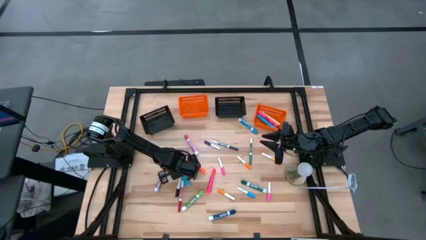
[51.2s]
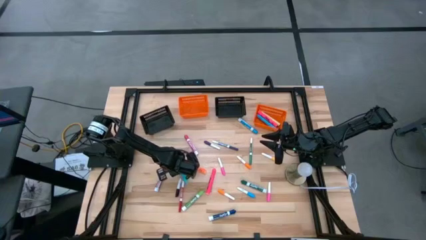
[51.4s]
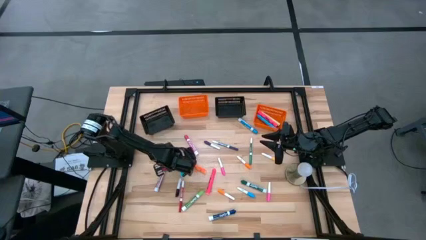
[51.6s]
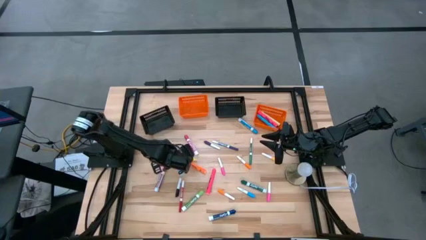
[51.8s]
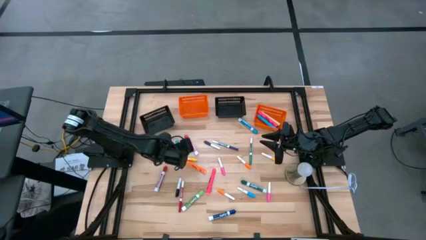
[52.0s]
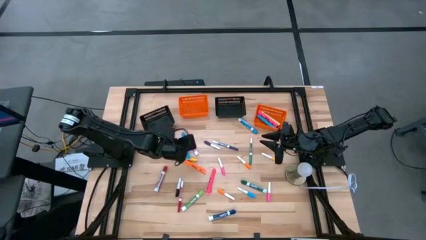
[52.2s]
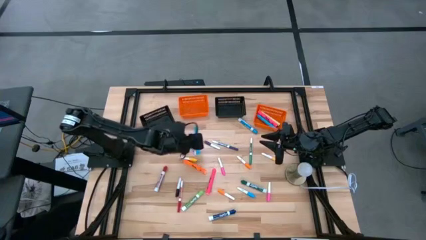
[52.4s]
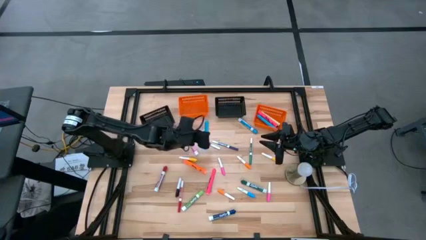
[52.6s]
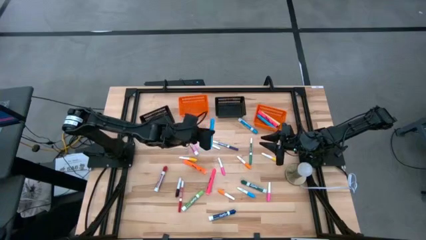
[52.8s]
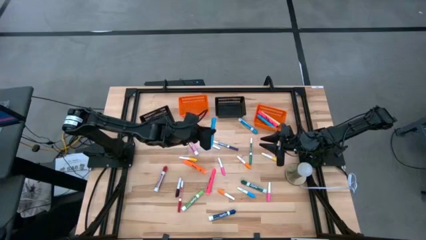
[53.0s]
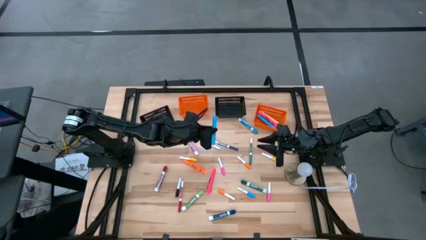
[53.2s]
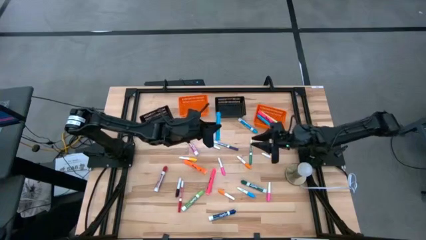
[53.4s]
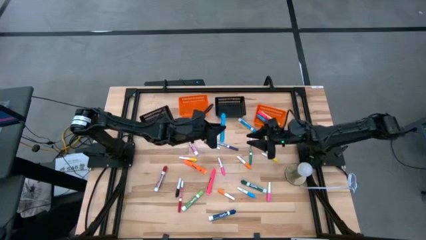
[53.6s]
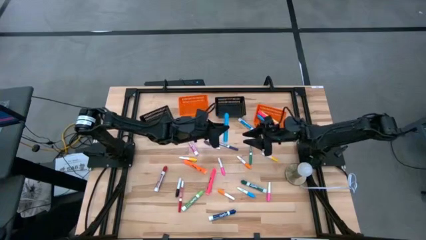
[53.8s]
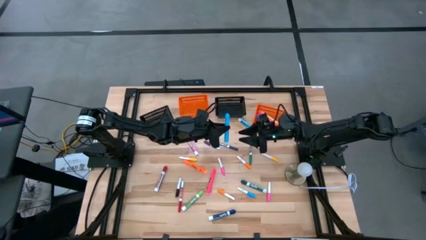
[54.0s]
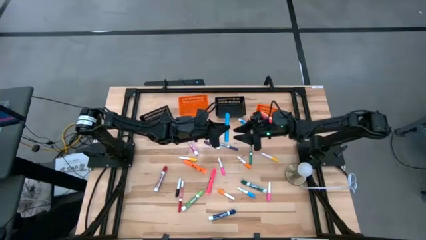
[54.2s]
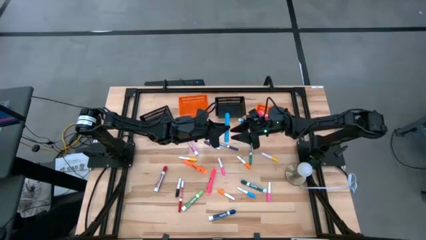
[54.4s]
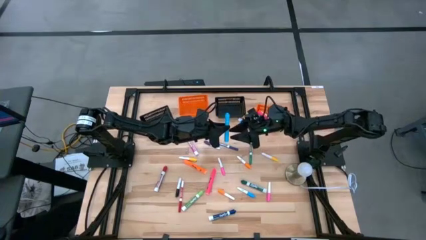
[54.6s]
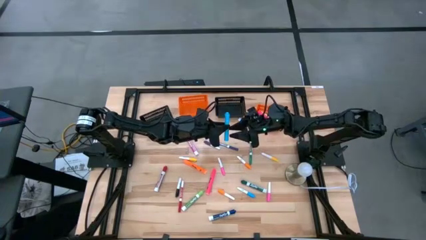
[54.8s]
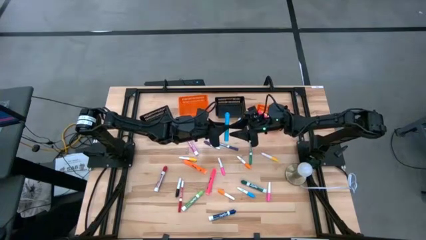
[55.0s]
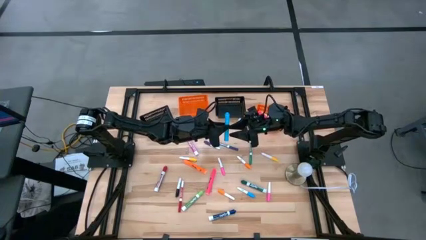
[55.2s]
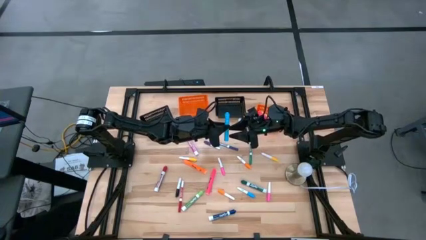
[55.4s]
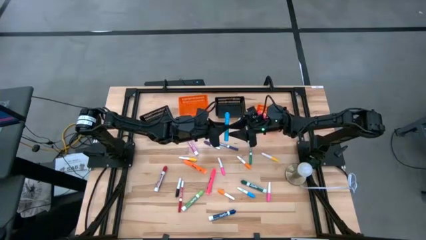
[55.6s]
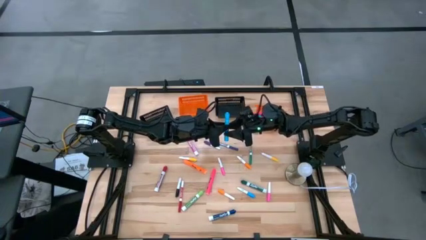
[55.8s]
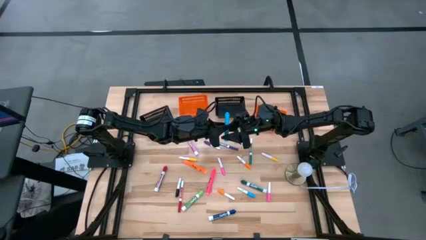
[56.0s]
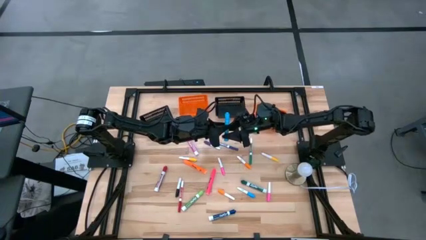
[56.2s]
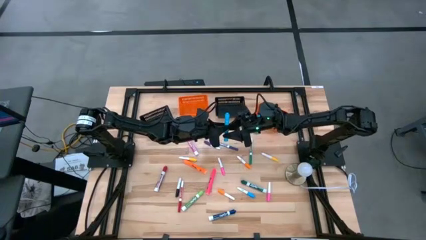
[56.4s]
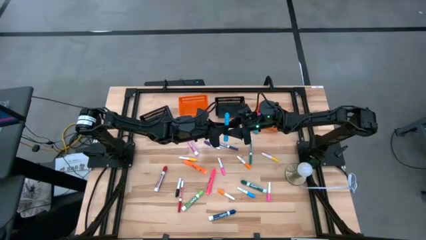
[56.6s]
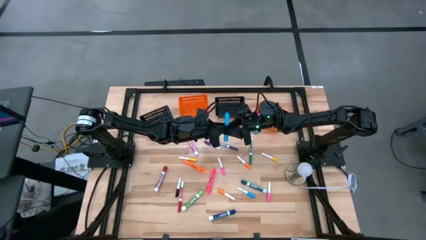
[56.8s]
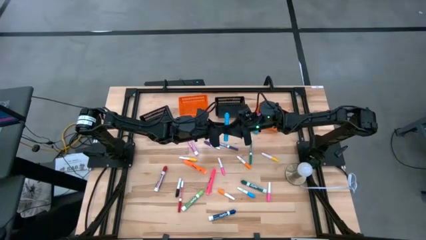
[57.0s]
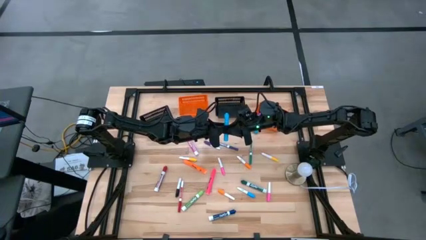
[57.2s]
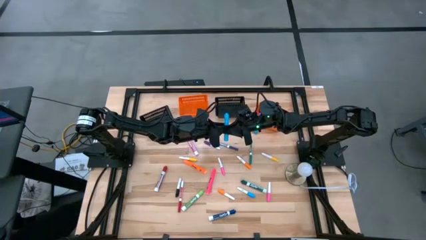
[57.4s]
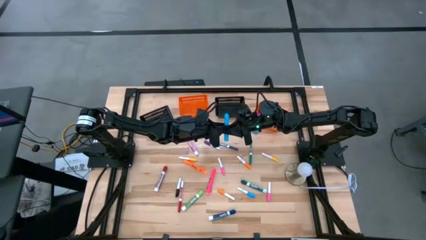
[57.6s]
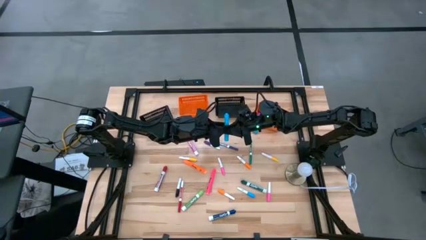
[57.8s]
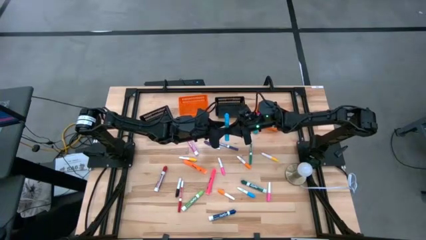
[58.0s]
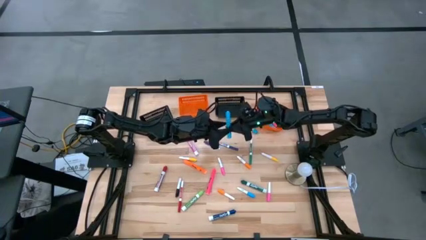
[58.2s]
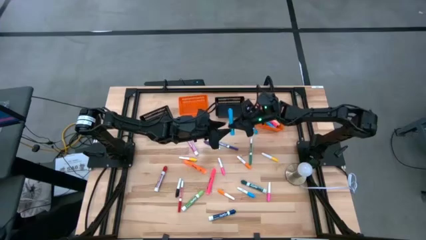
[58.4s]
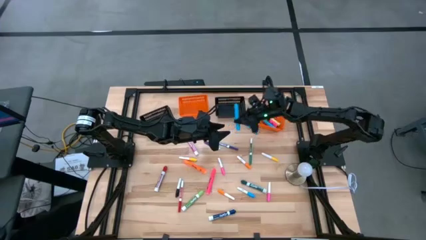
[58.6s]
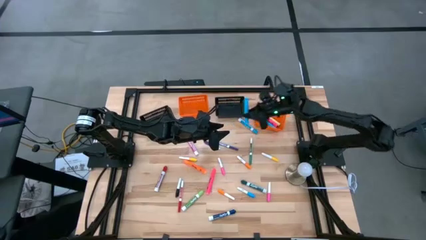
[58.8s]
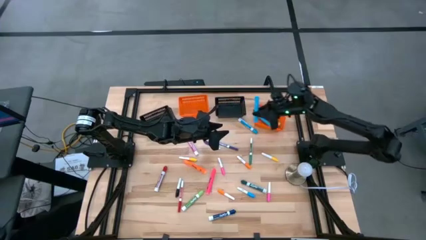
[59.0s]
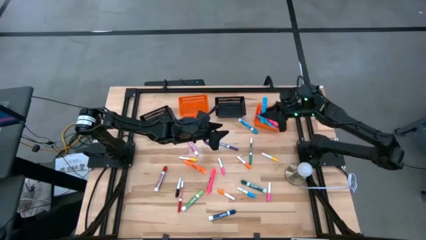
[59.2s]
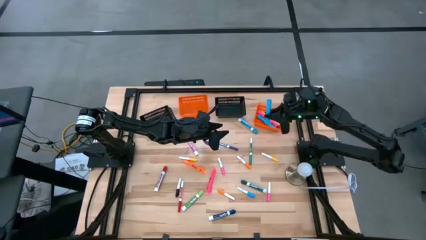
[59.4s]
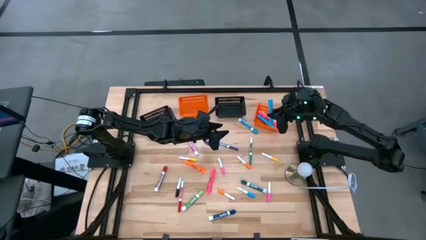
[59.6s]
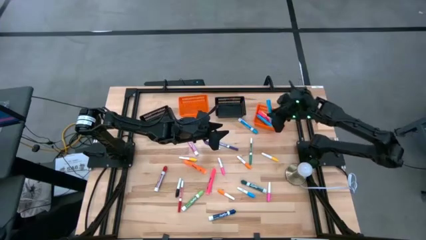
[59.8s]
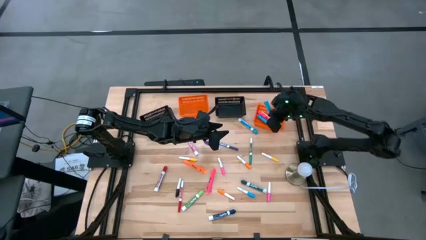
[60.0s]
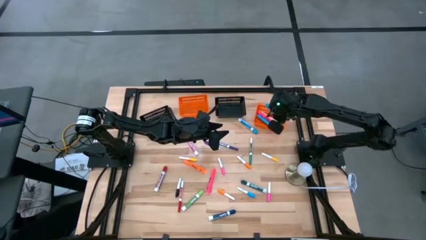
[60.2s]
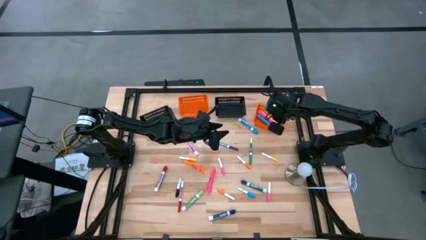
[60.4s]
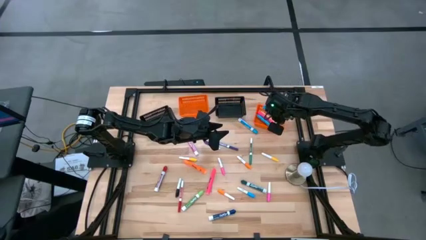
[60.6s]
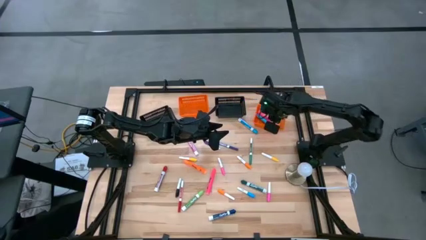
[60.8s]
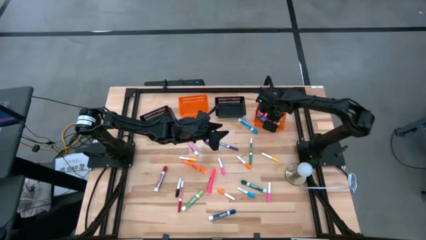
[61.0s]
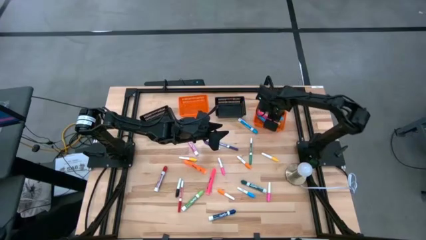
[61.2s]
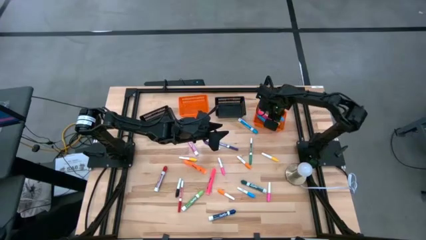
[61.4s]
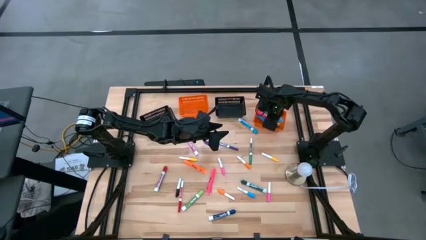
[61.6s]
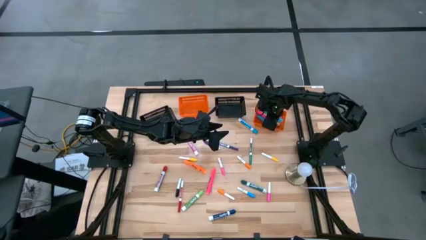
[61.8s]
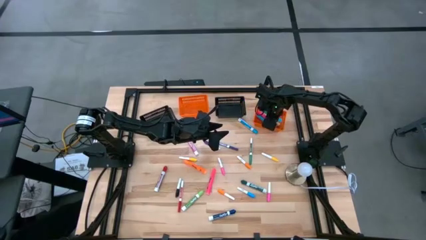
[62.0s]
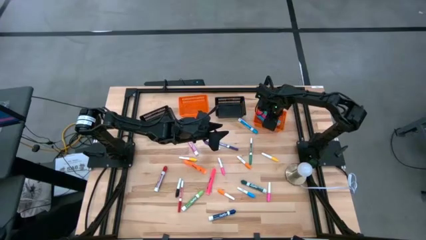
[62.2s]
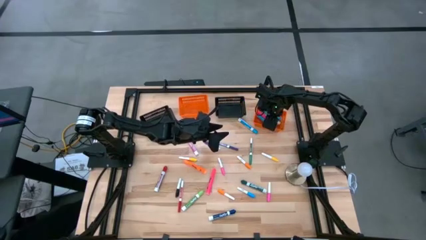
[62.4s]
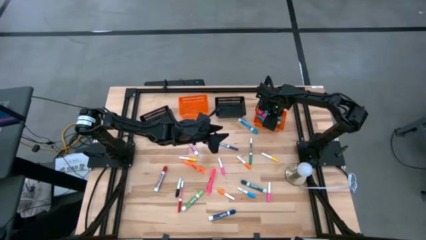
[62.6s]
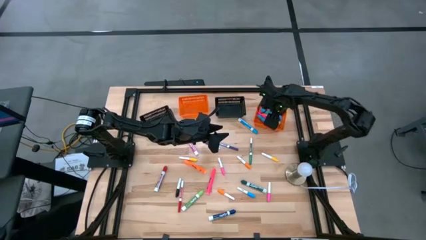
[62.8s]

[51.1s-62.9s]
Task: Pick & Place Markers
Put the blue marker into the right orange bin

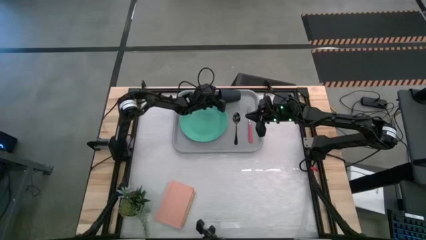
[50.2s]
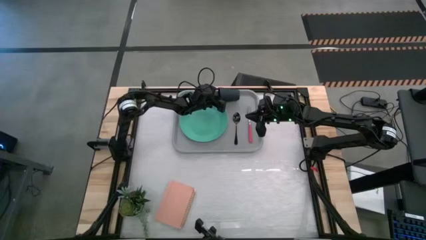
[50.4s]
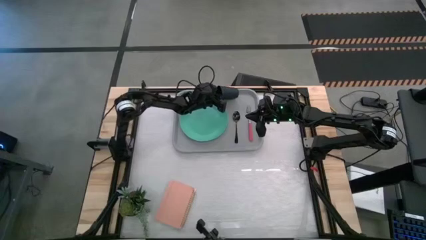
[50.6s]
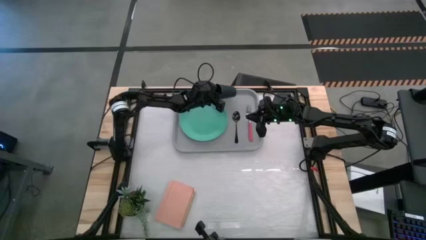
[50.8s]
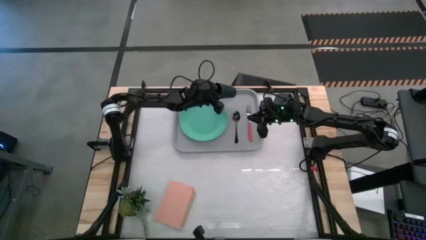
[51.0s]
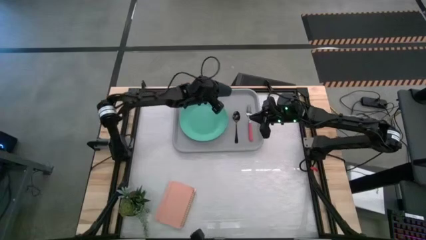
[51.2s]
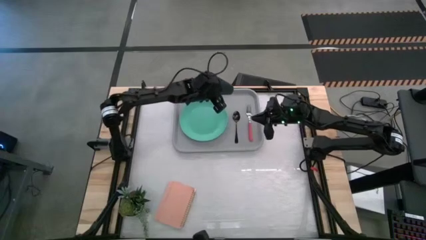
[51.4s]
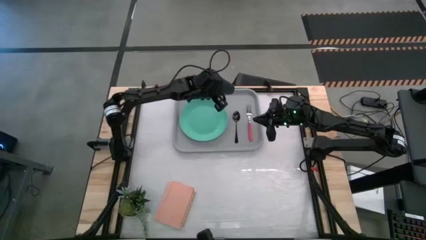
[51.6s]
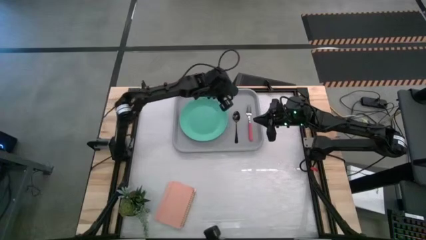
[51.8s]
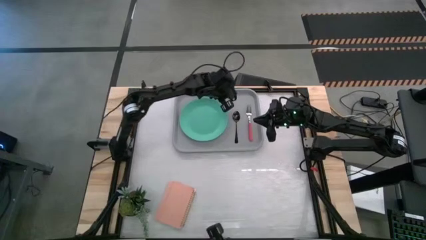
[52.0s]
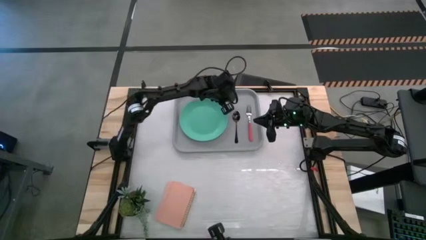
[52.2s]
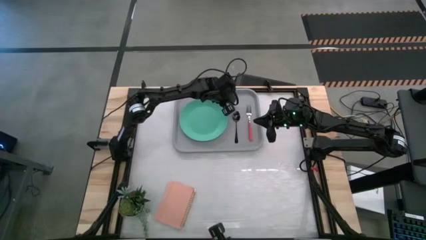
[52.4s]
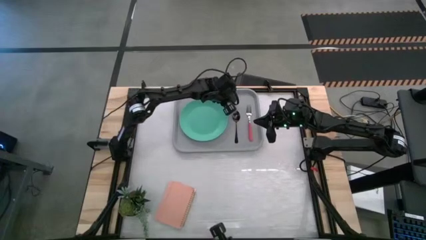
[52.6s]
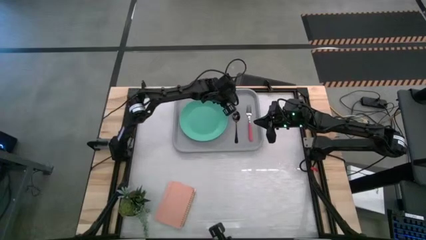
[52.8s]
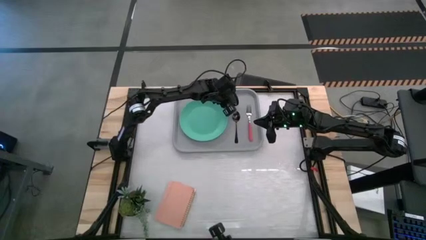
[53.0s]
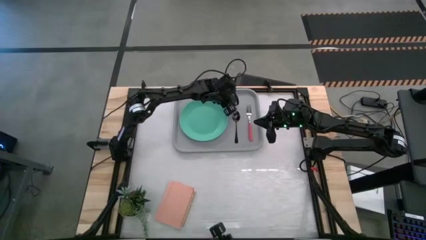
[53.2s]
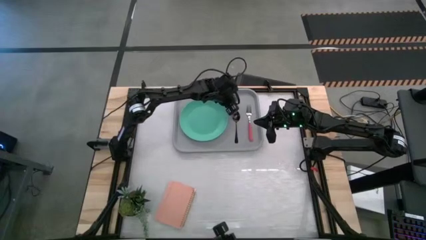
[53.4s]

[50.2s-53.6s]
Task: Pick and place plate/cup/fork/spoon on tray
Put the black cup to the right of the green plate on the gray food tray
